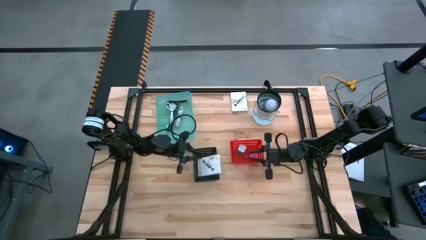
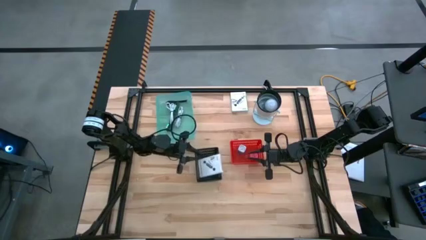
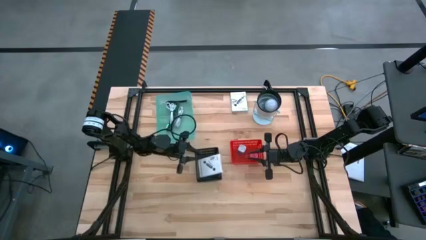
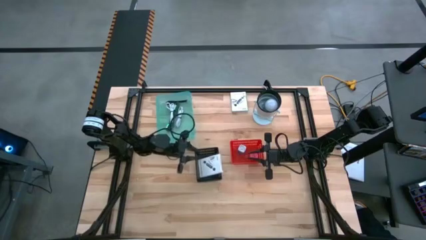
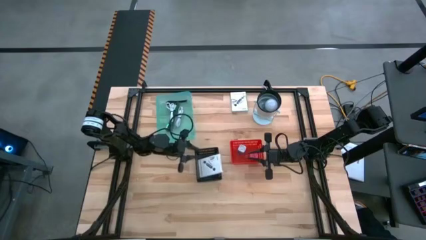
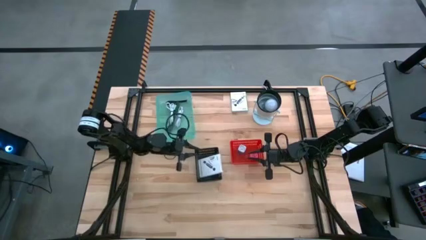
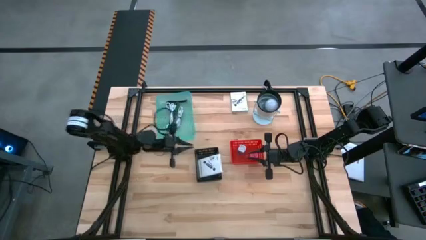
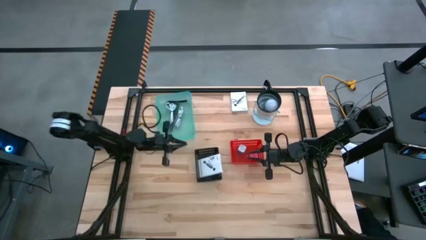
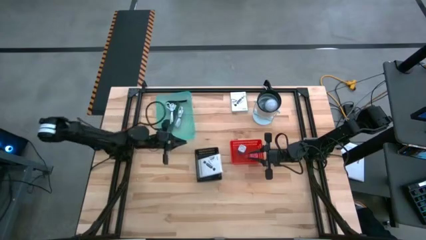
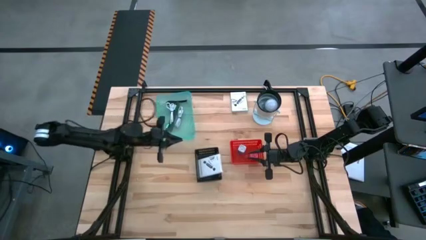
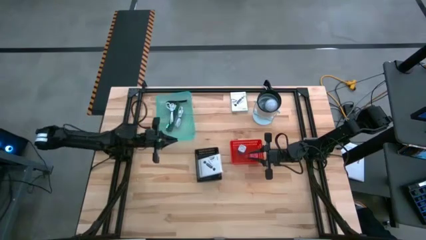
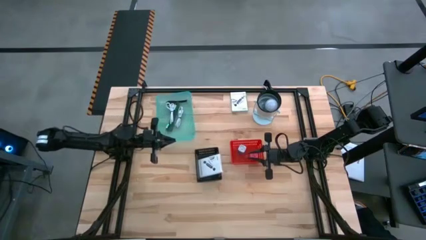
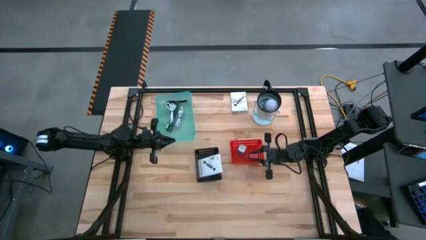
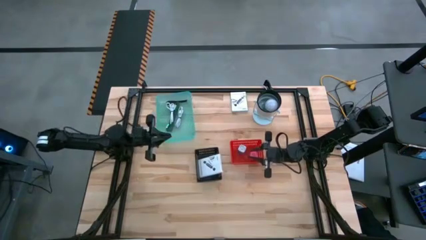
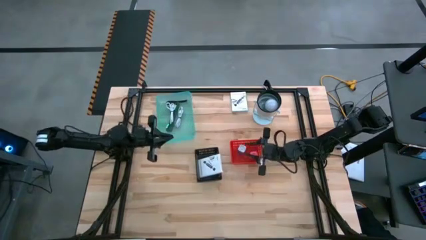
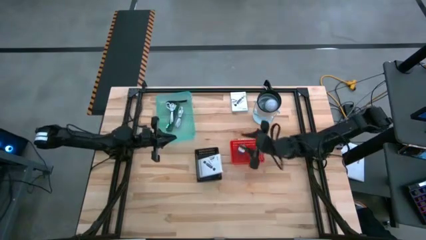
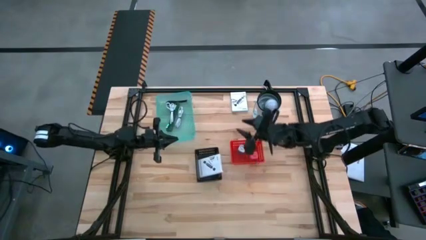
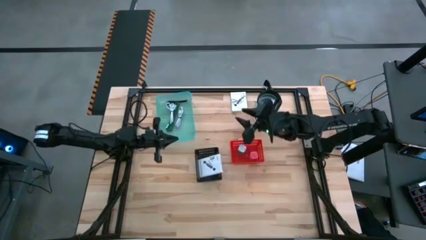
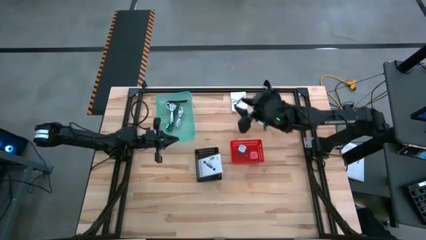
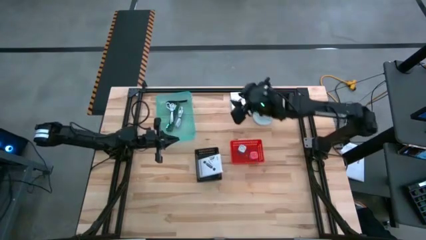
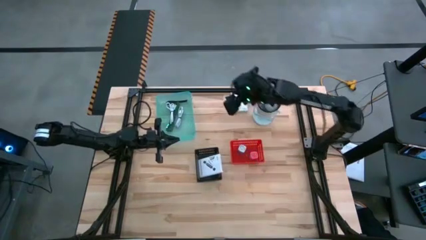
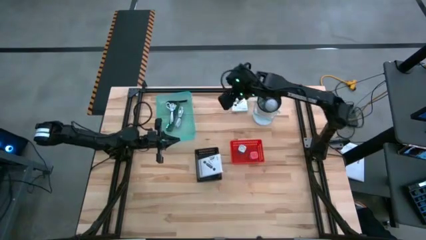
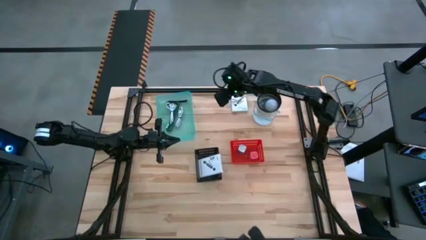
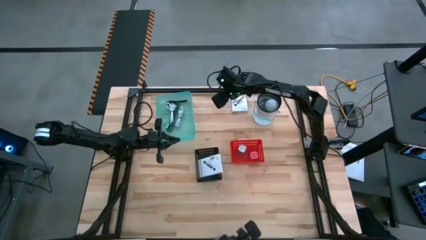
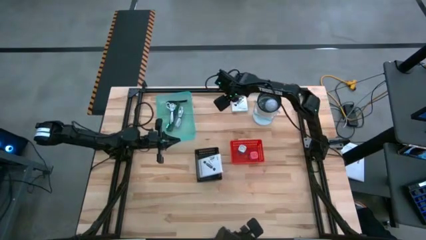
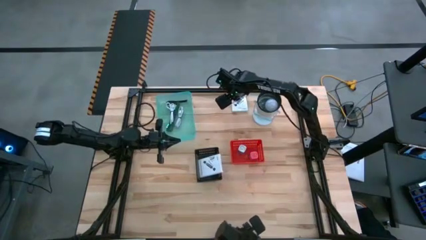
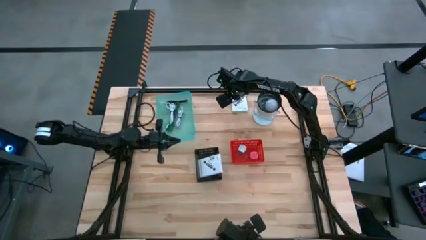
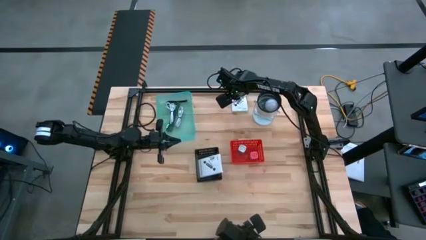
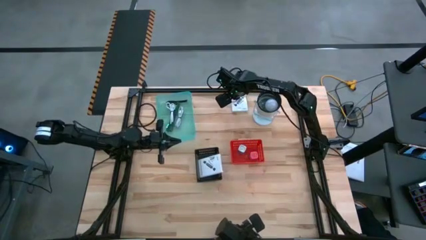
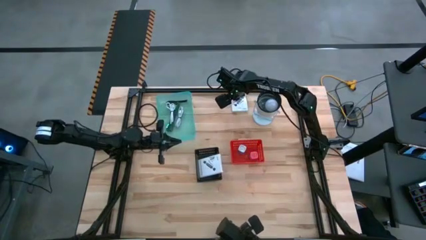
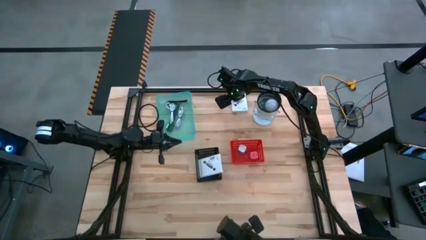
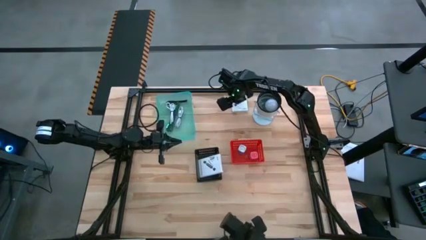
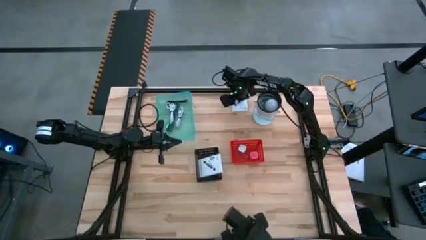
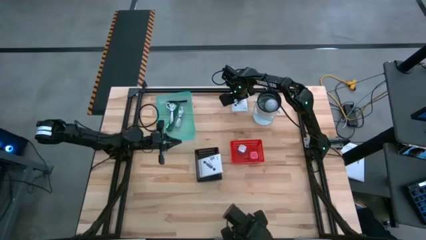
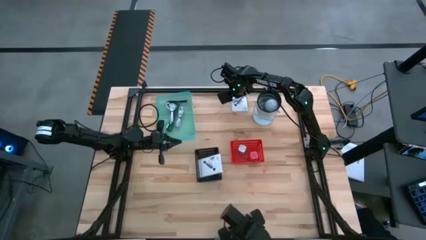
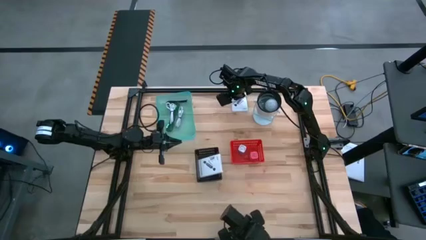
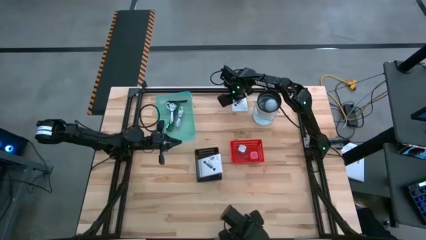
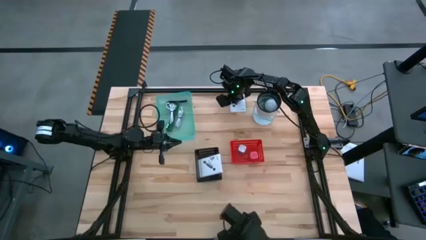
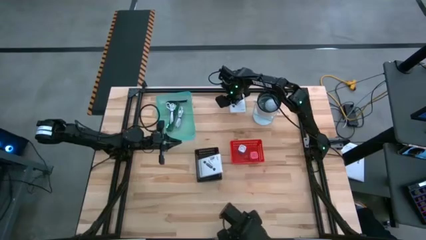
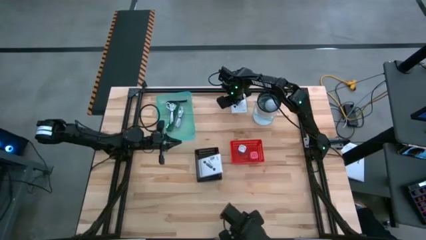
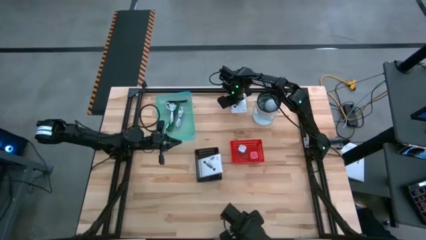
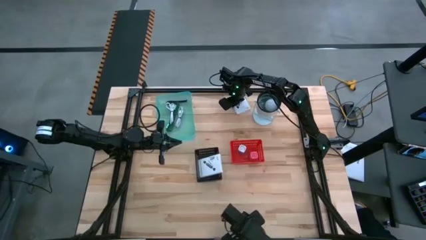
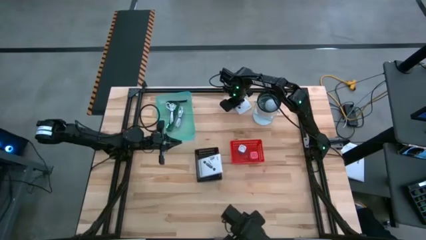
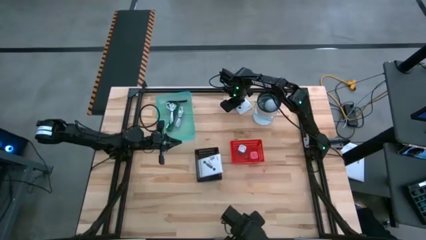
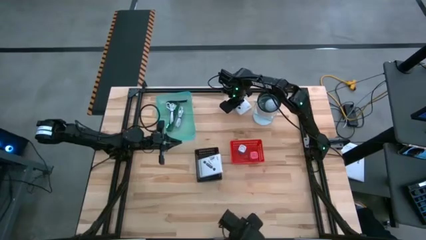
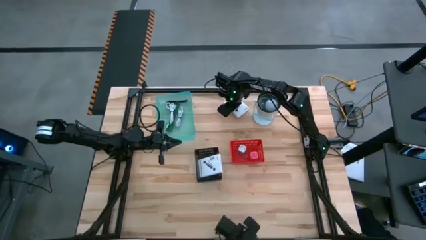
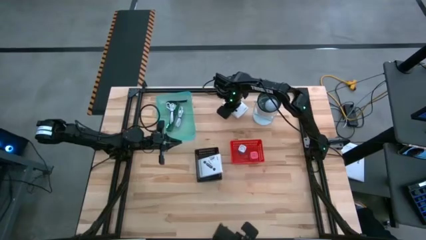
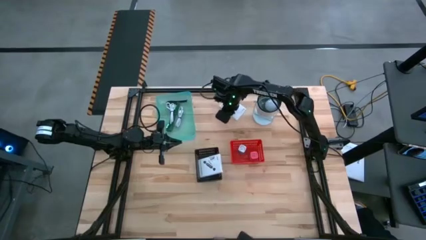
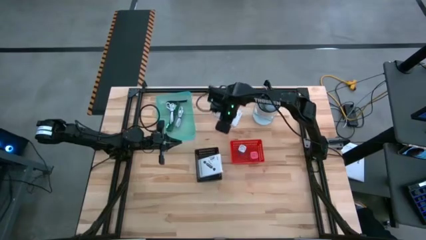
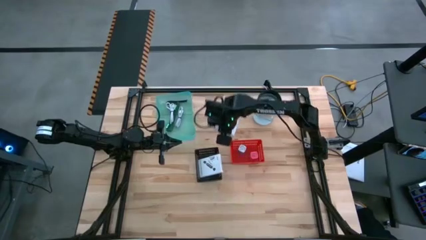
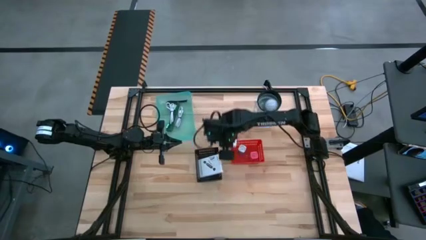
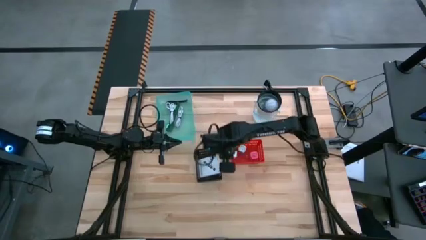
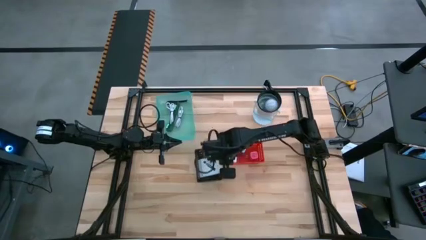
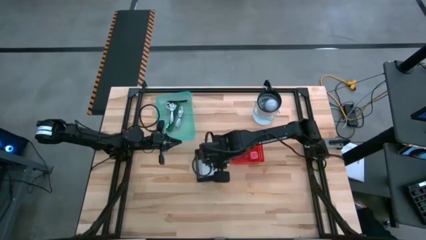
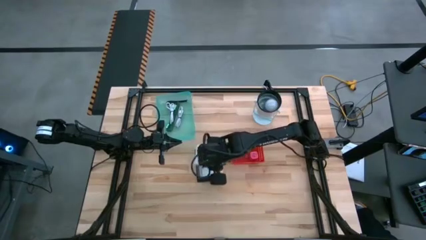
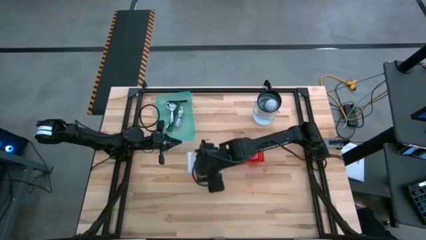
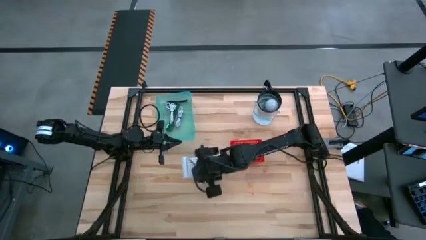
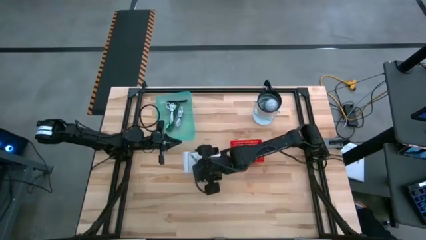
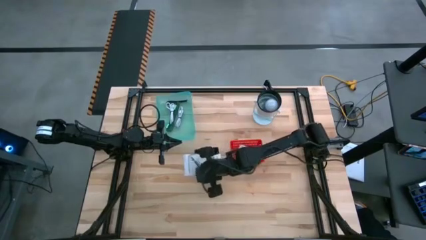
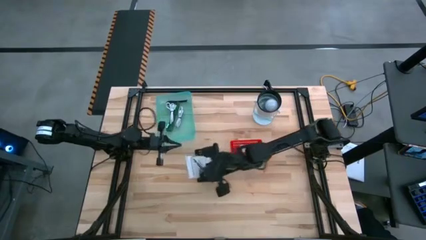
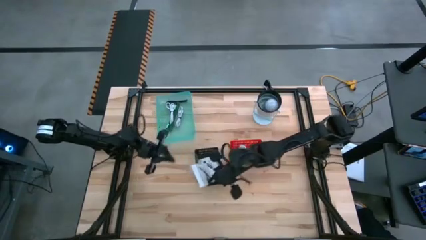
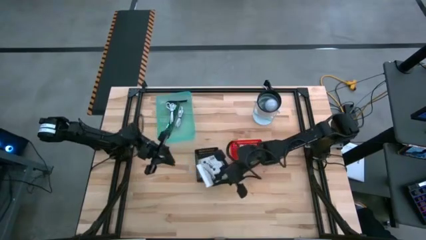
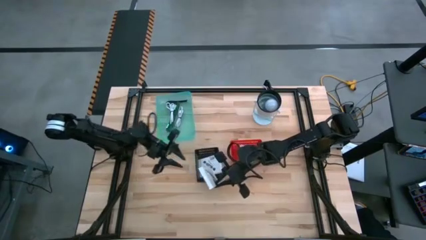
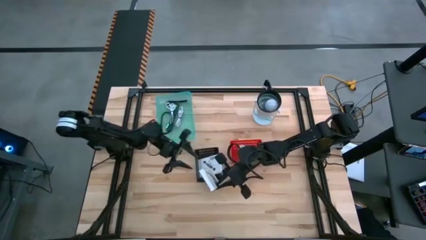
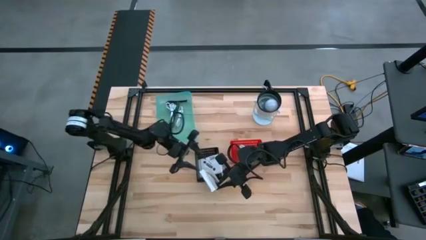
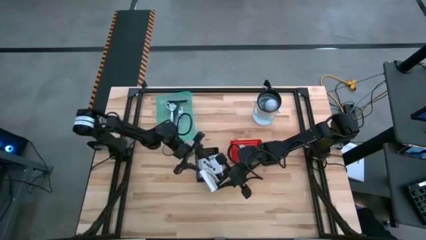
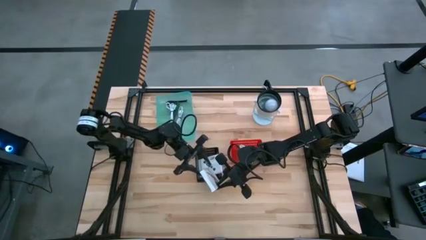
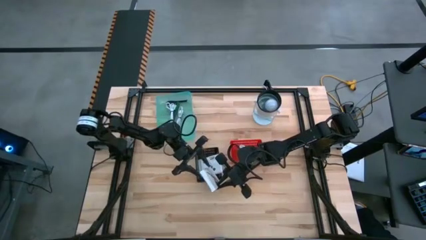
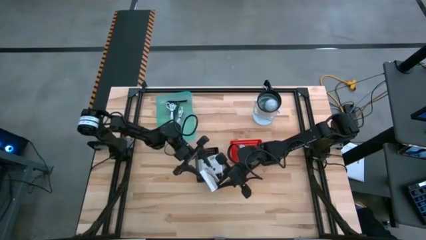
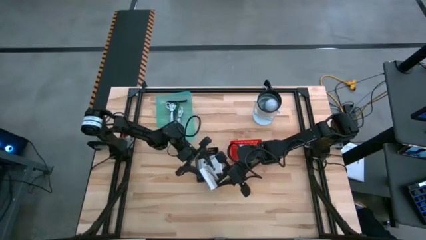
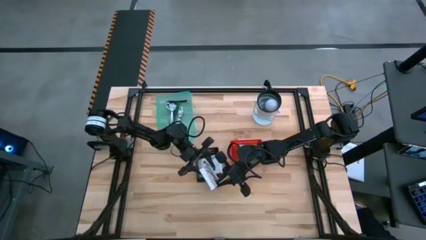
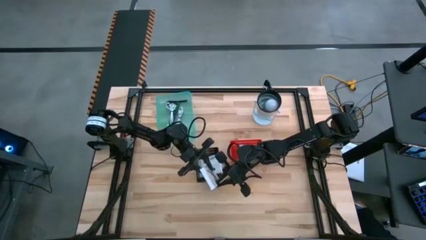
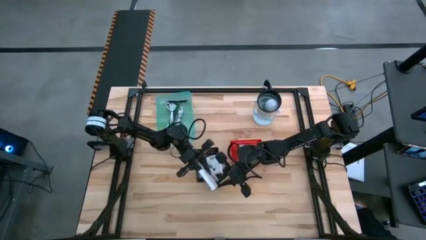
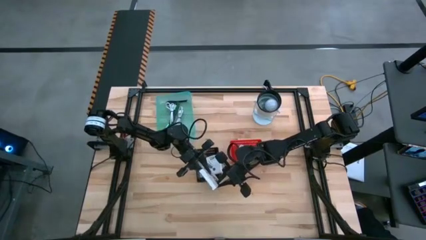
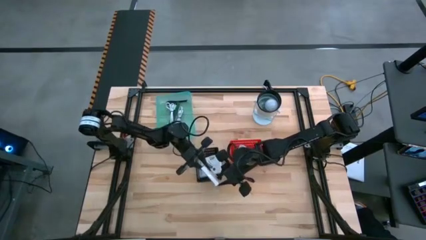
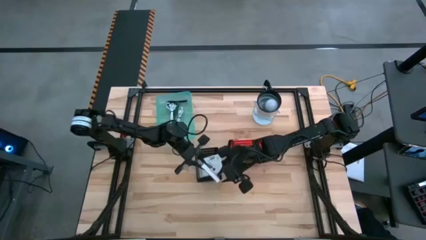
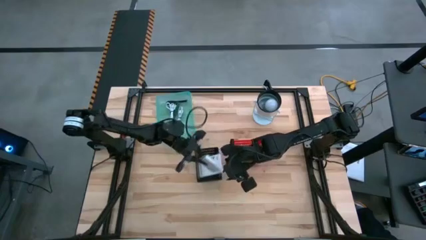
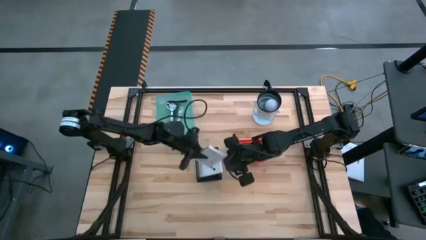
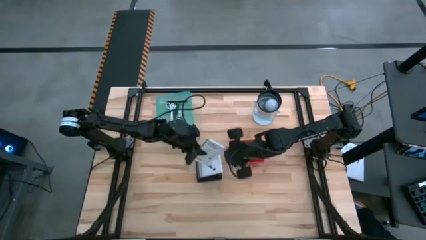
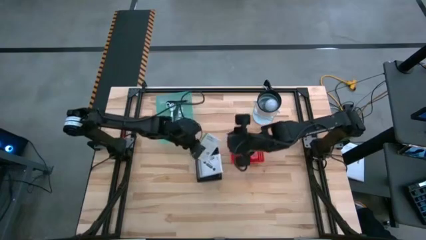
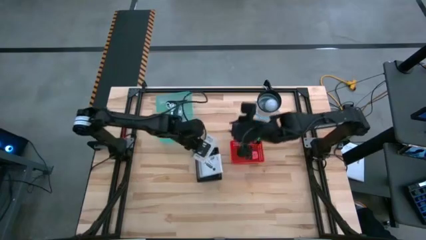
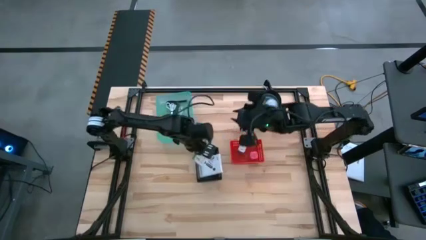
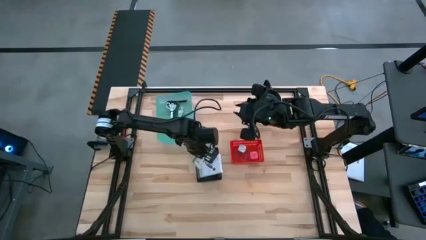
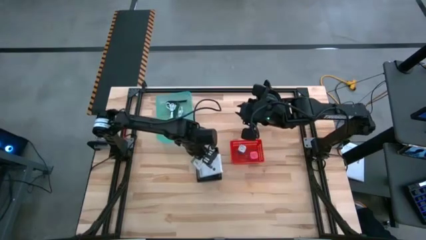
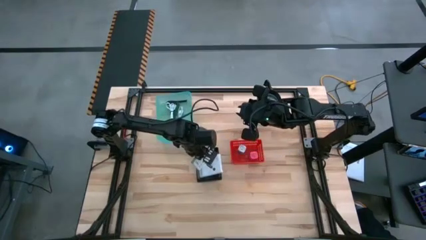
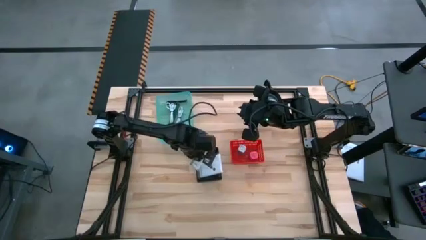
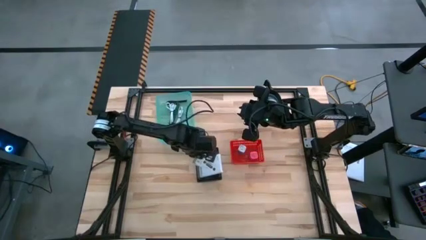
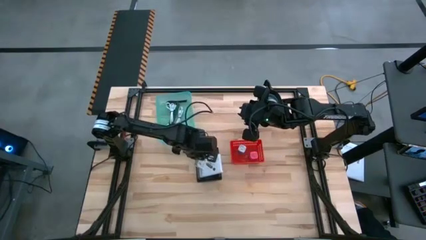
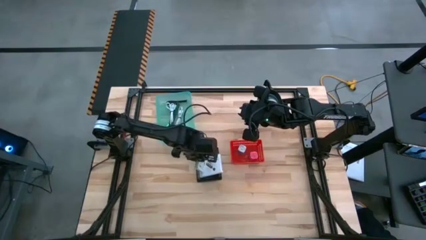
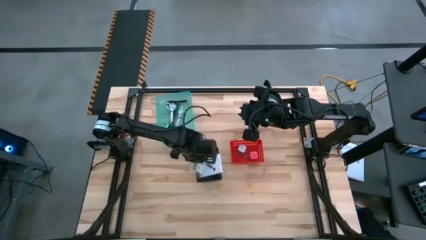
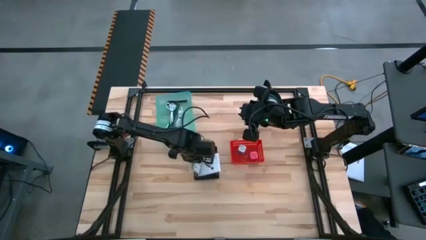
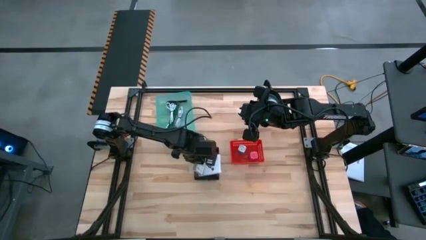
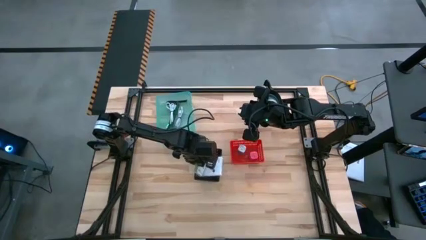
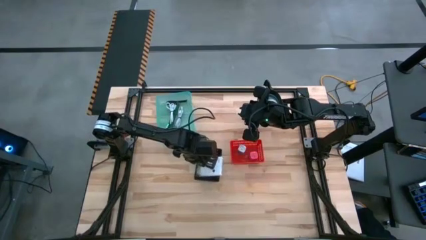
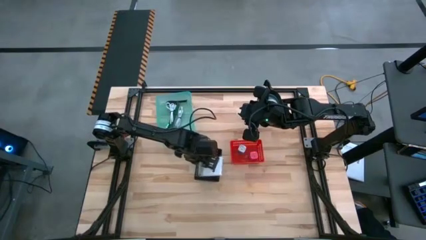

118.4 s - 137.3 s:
Task: Pick and place items into bin
Put the white card reader box into the black bin
